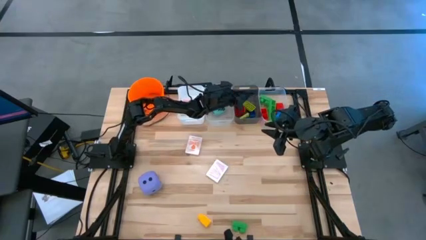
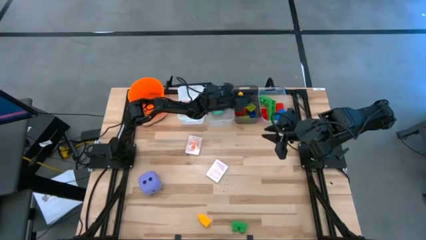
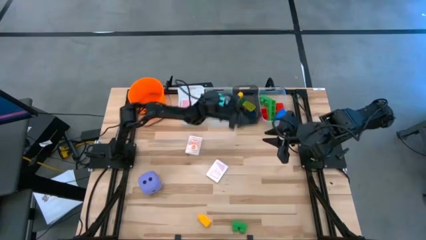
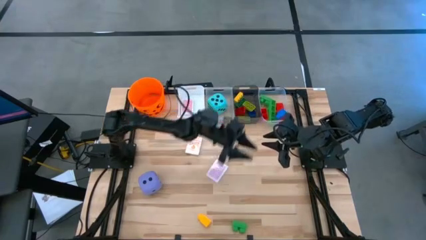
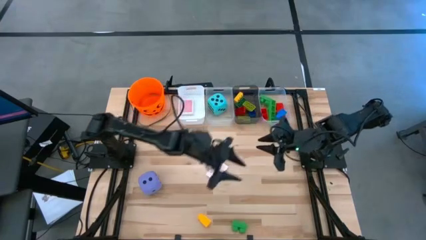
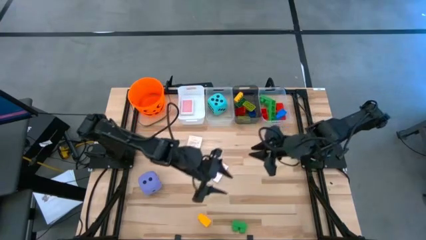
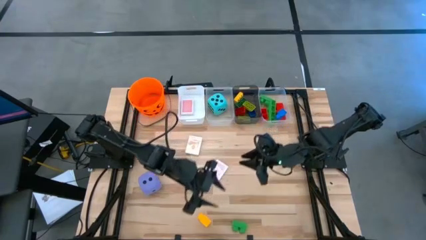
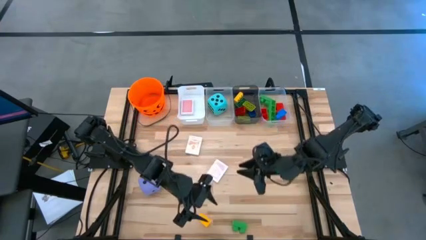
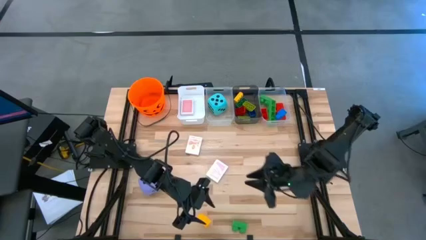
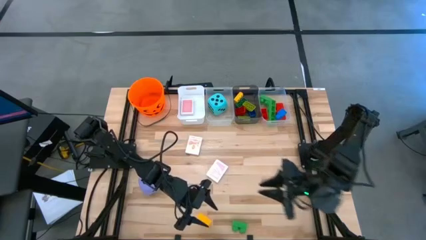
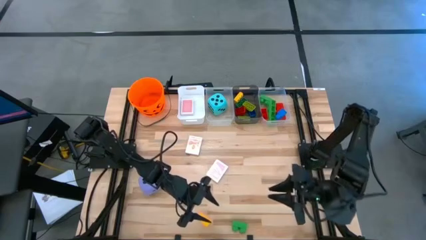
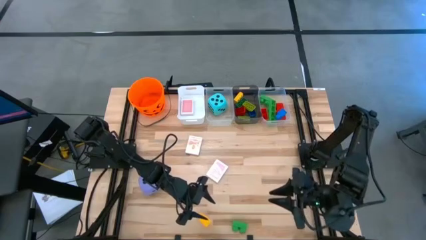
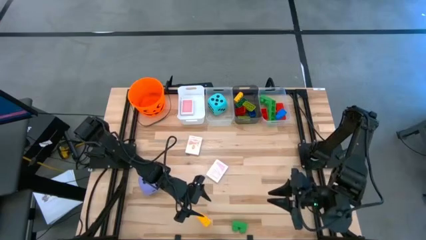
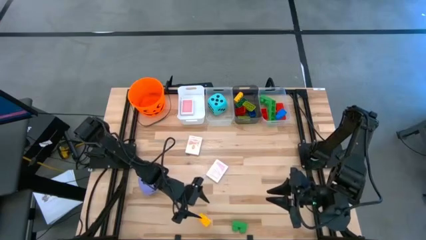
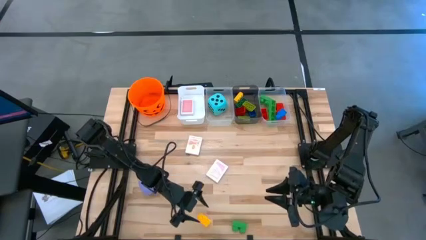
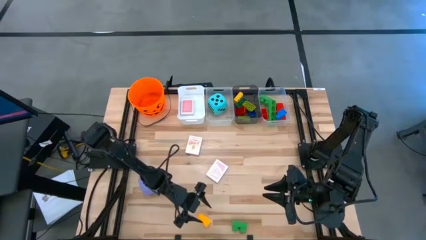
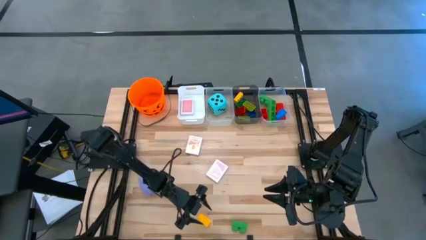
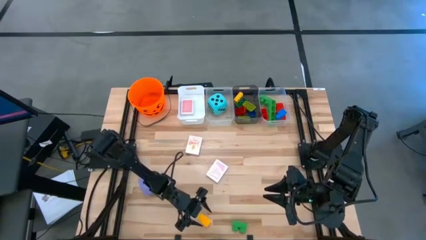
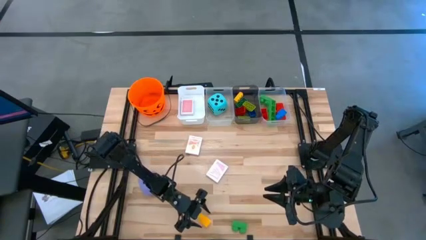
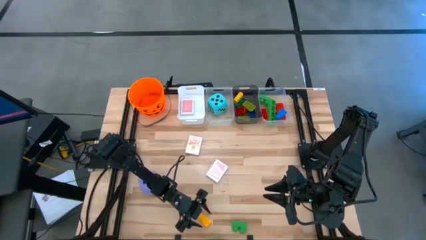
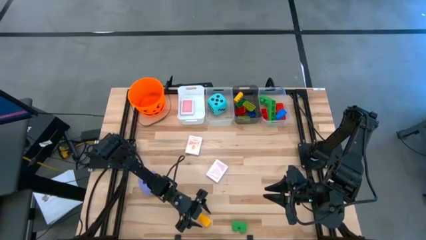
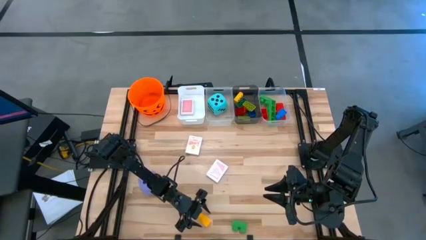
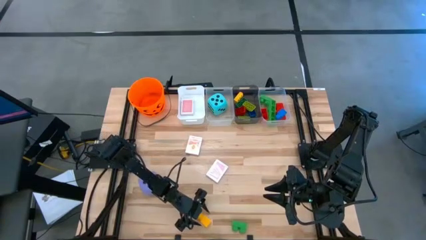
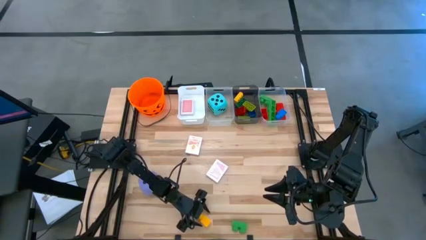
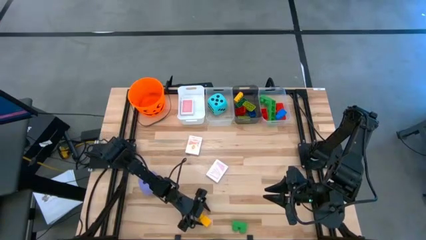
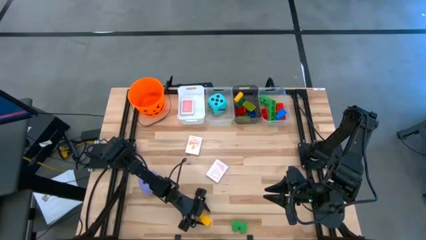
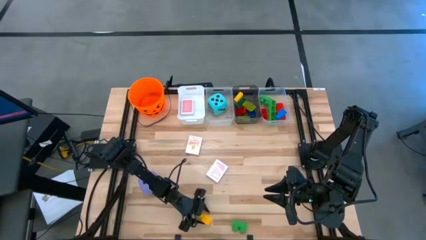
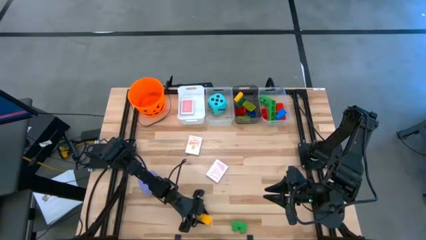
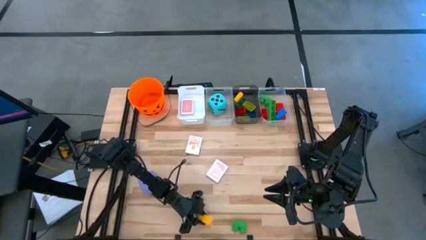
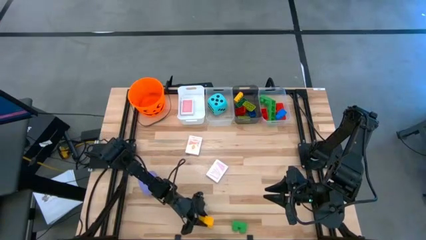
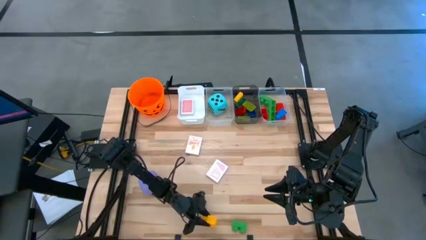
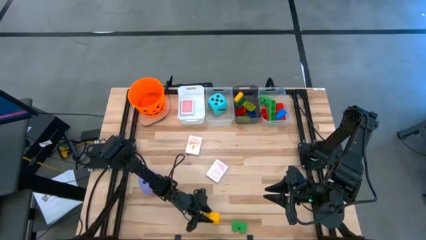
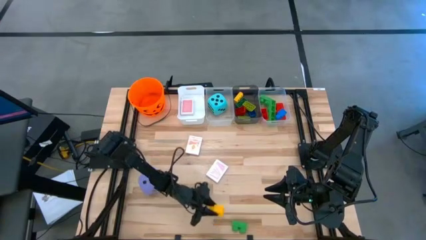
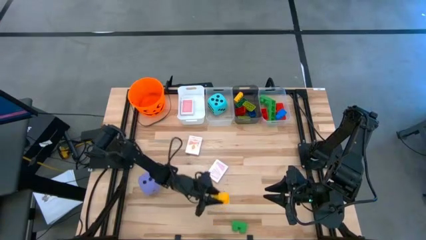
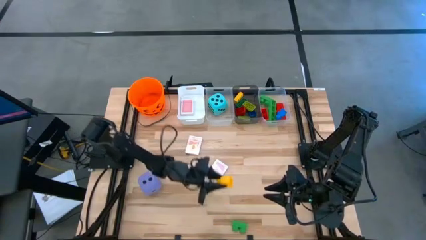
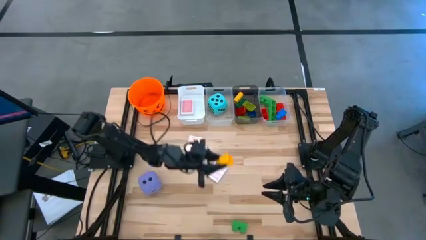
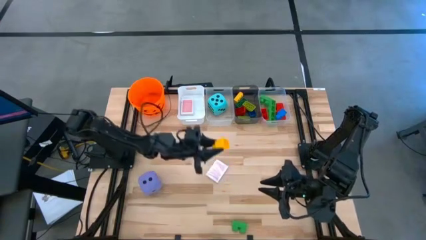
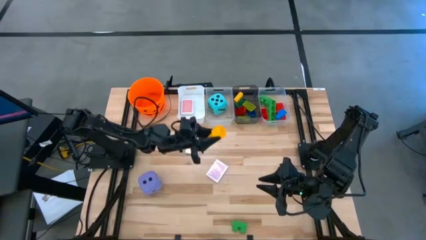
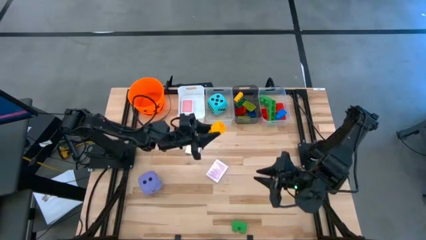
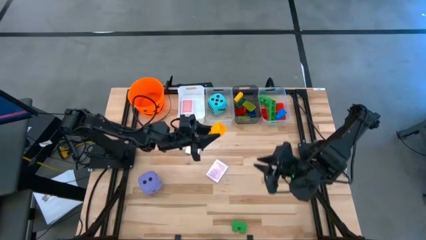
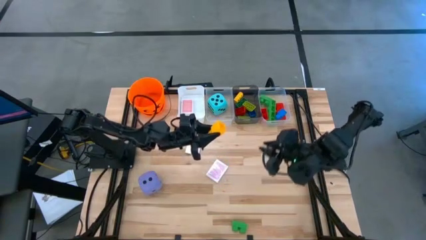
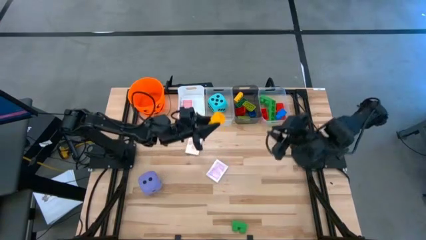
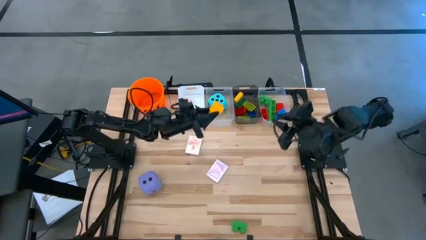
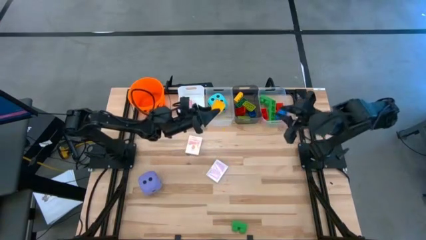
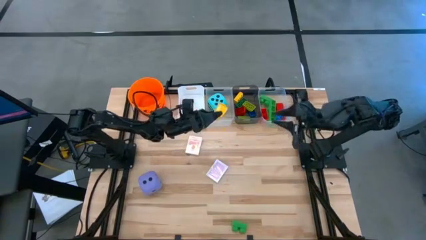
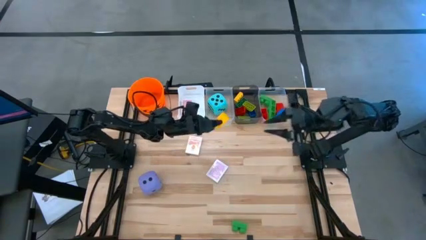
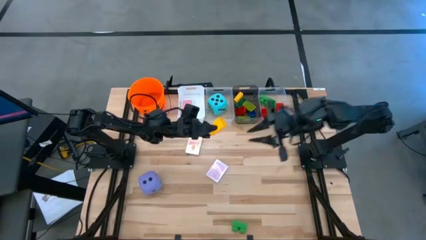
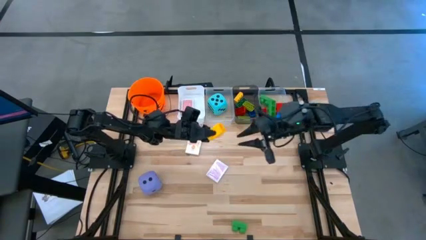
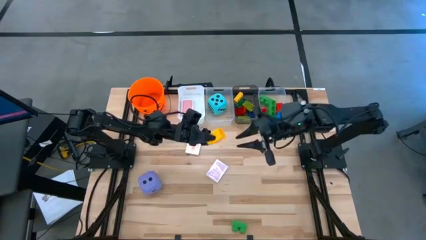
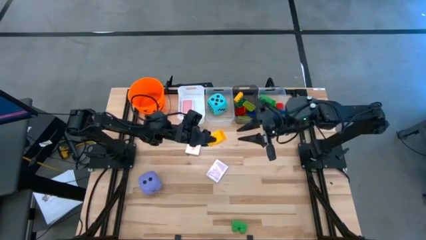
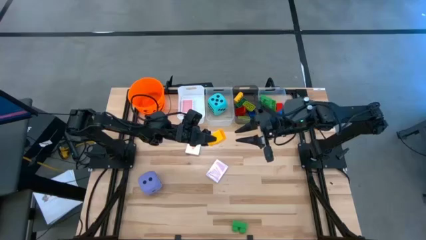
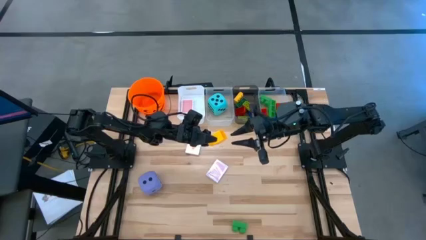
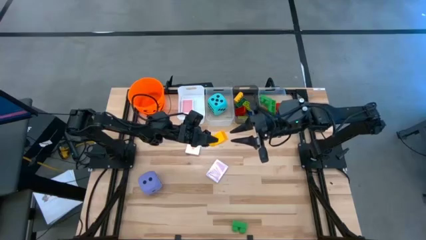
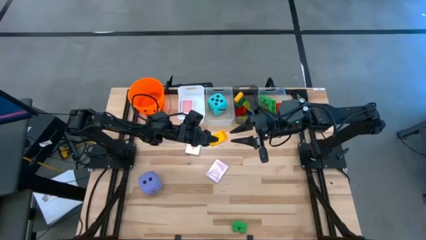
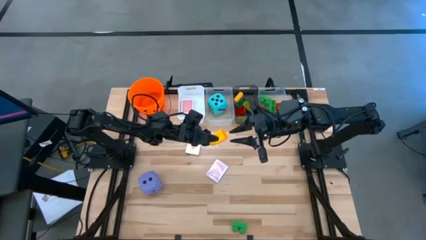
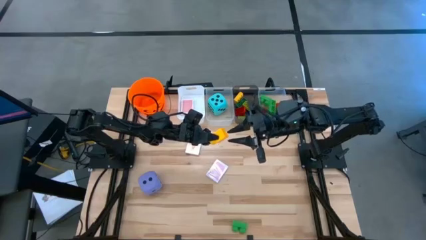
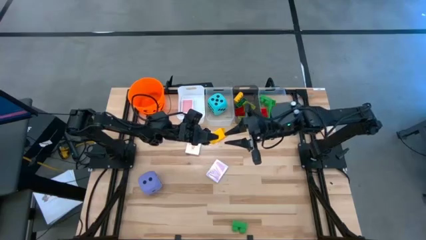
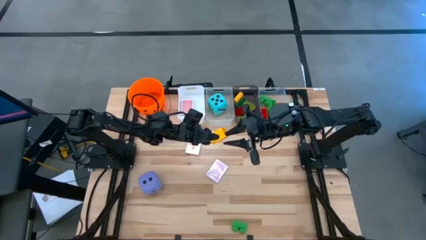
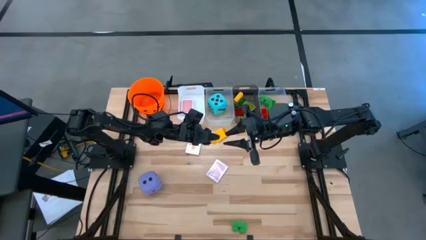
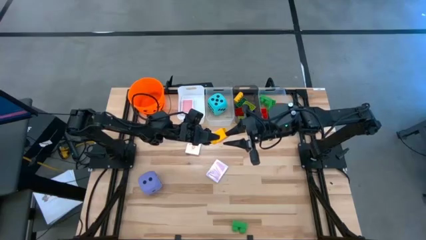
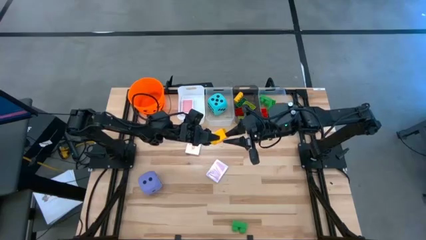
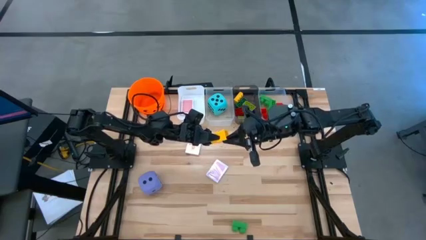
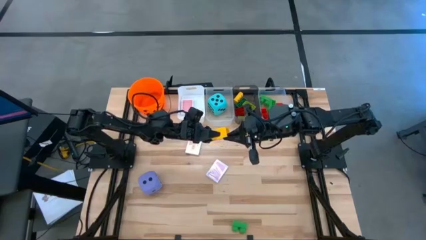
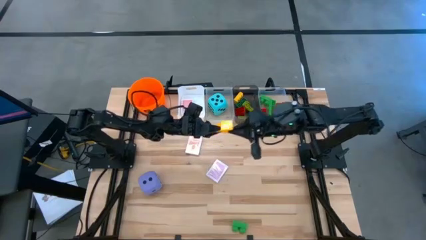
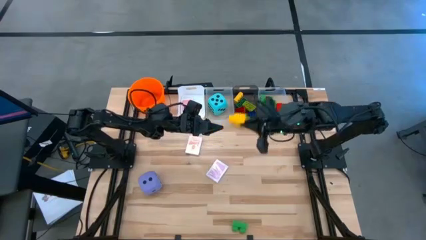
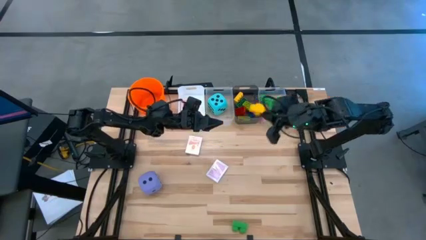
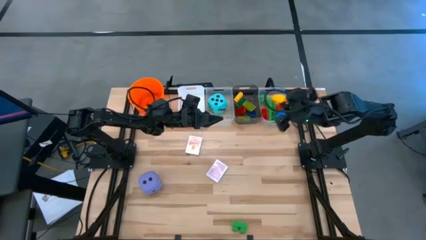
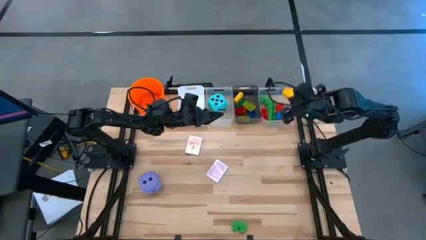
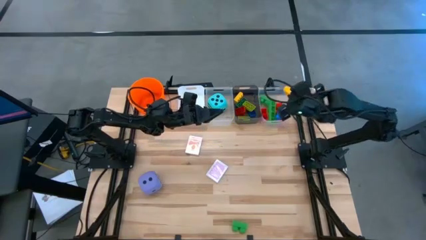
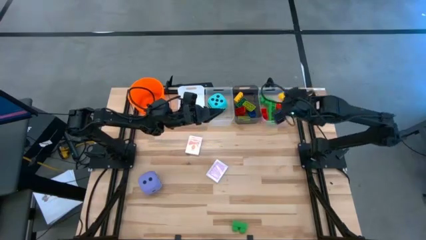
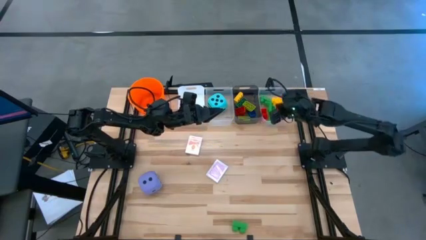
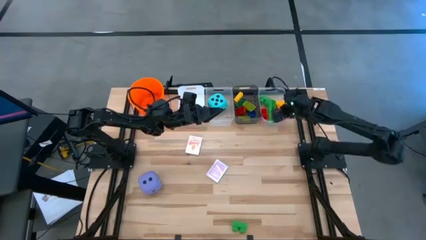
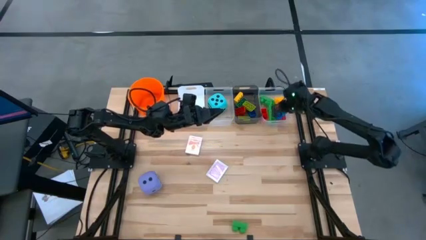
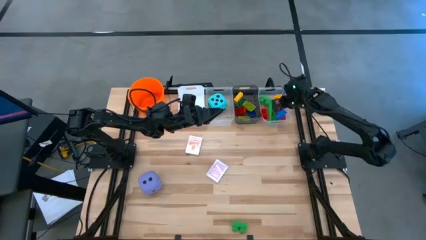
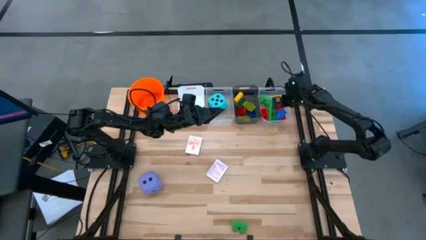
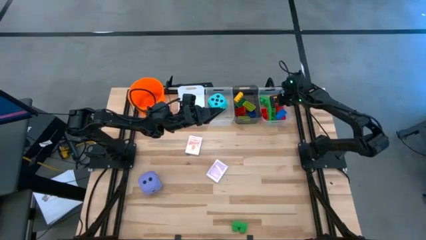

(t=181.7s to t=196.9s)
Task: Pick & Place Toys
Put the large yellow game piece into the right transparent bin
